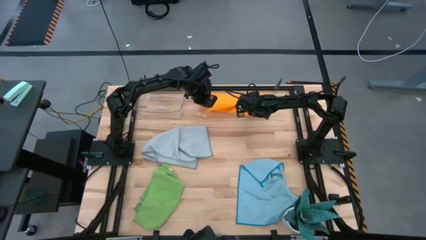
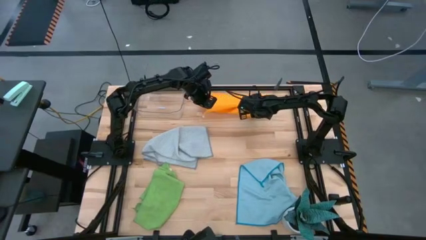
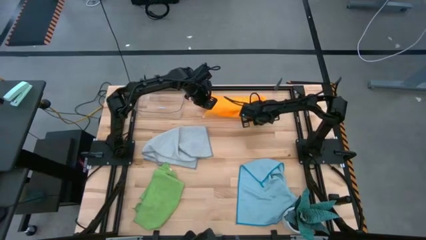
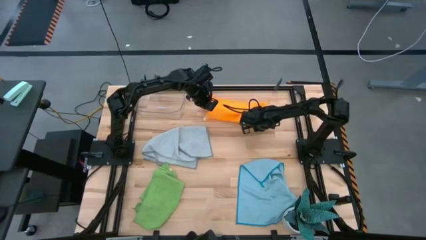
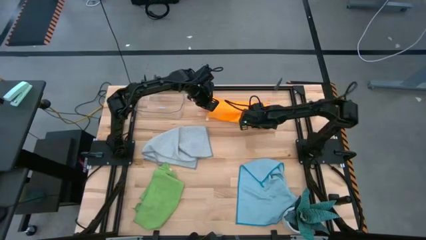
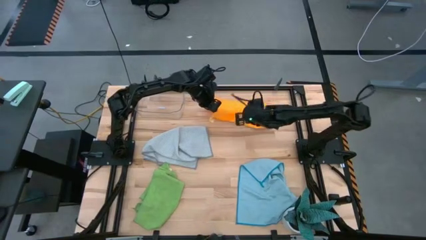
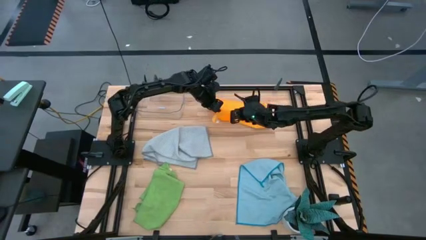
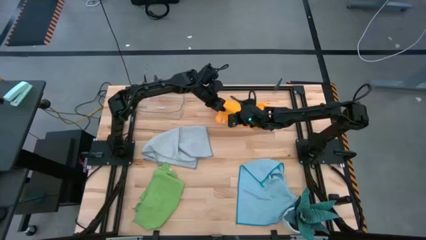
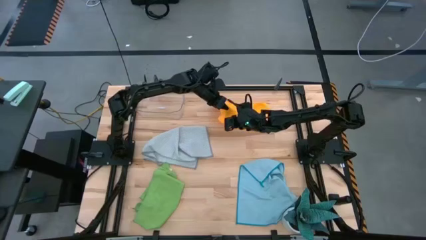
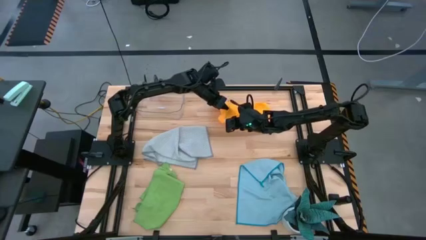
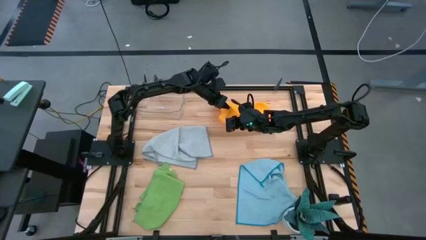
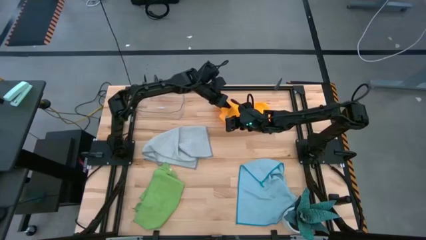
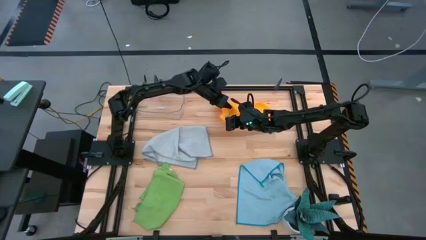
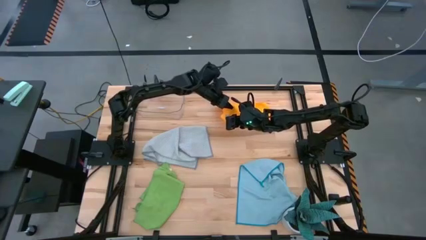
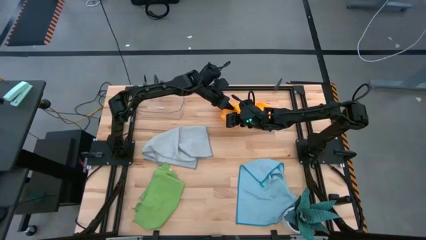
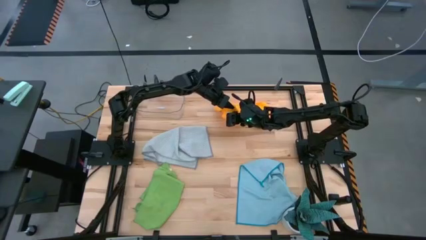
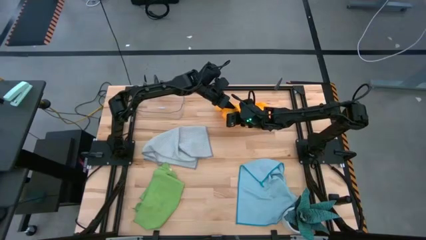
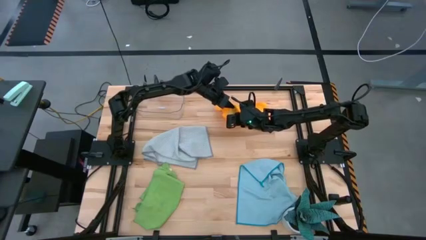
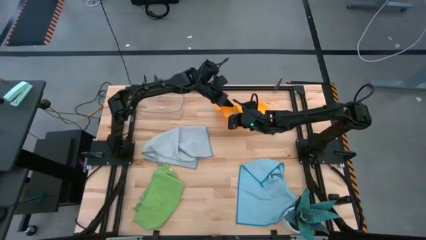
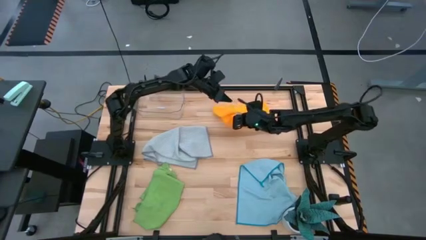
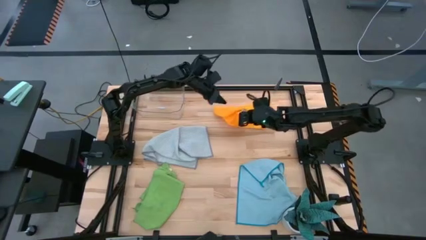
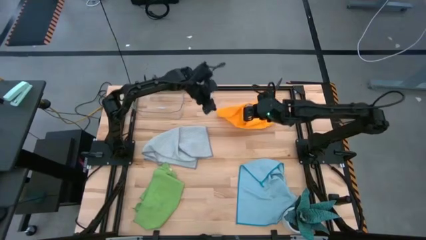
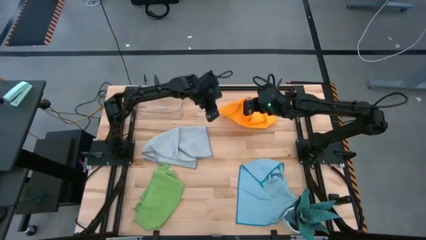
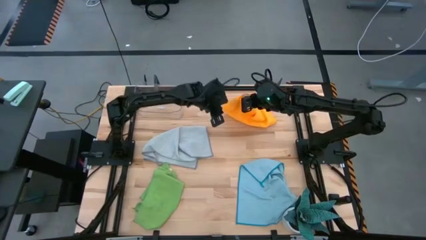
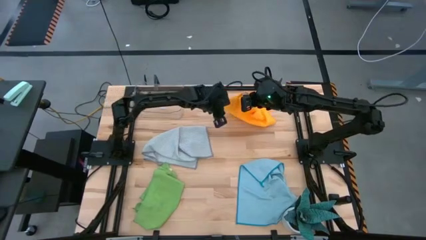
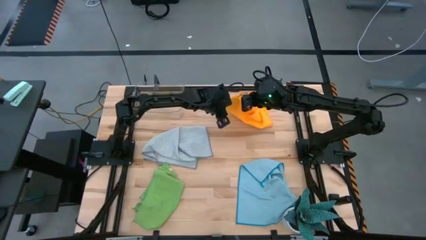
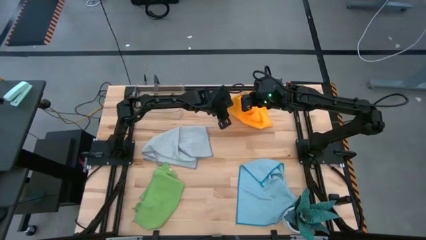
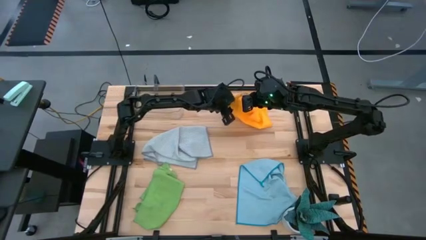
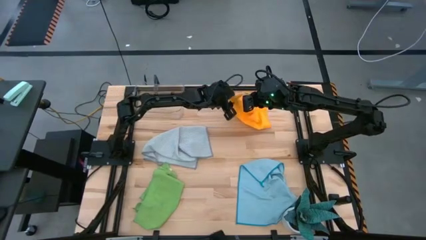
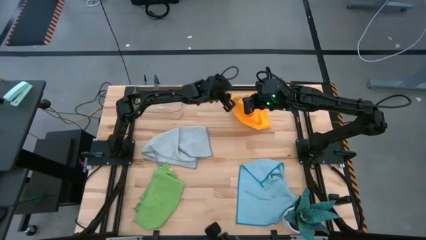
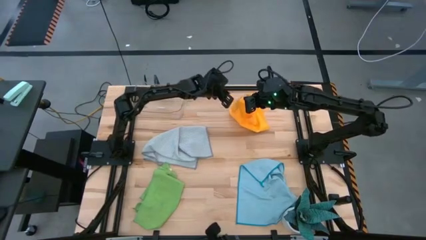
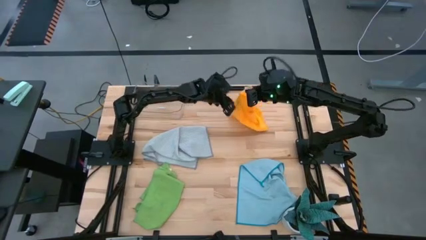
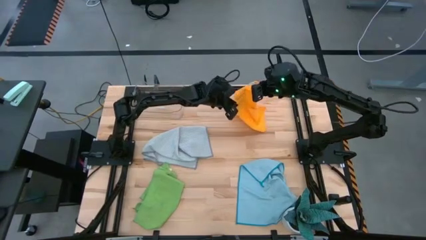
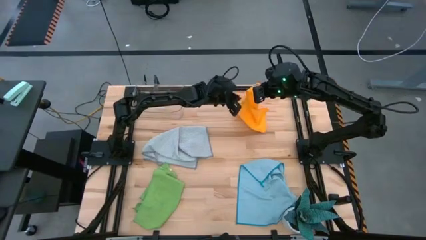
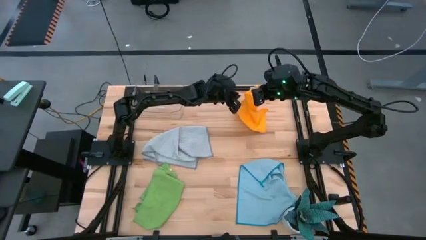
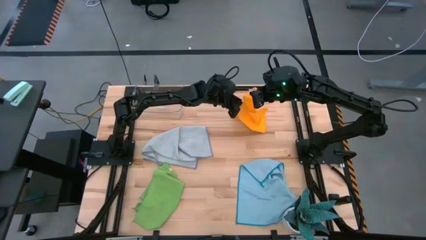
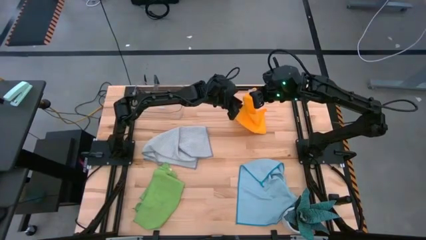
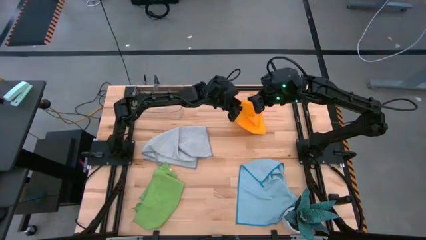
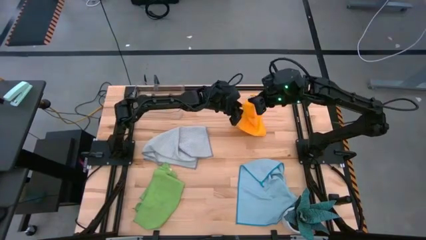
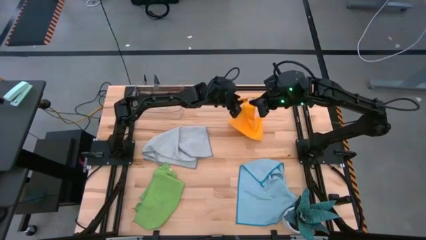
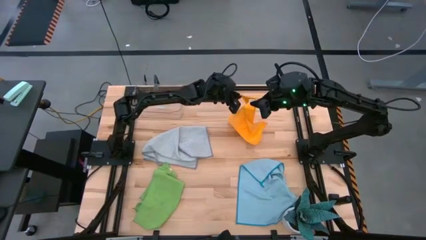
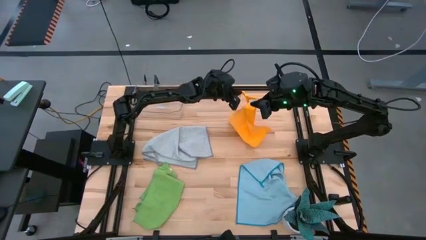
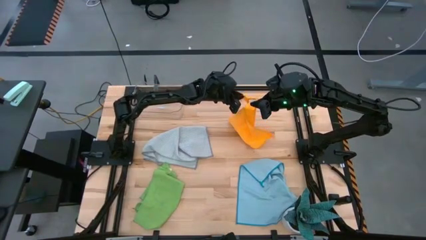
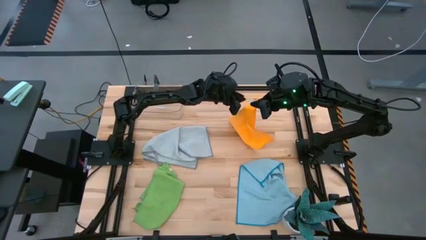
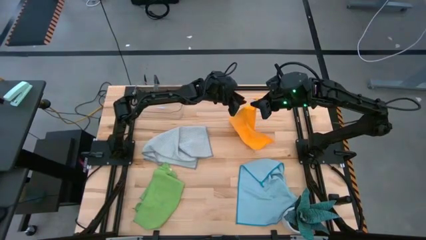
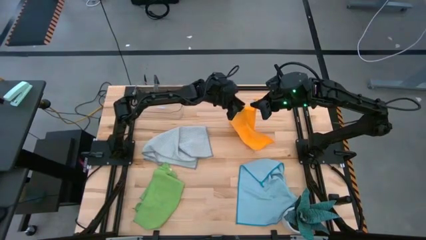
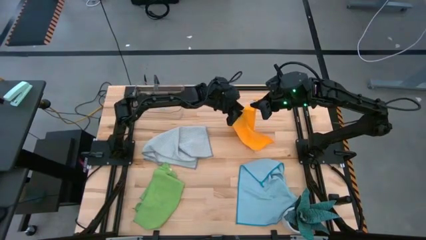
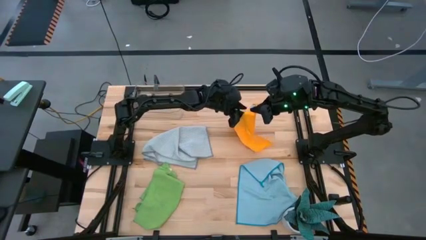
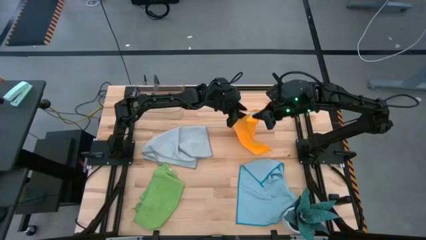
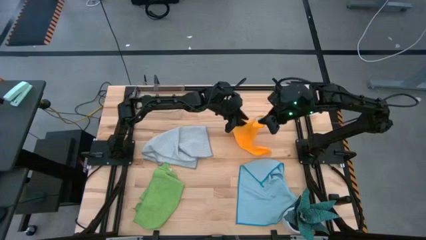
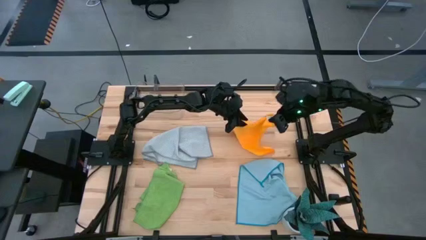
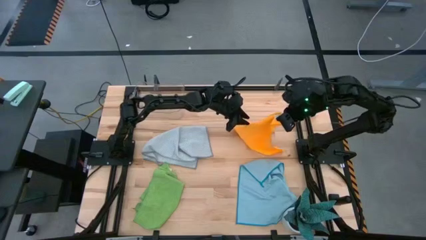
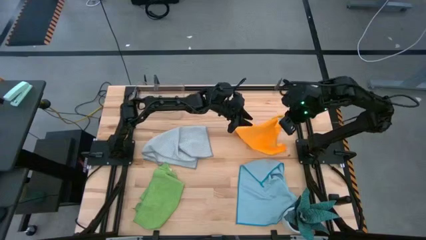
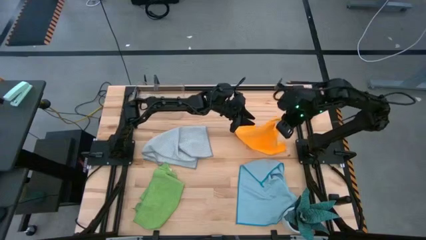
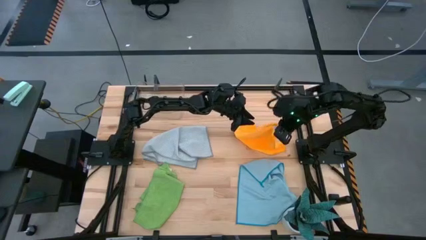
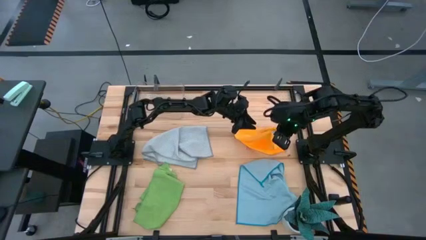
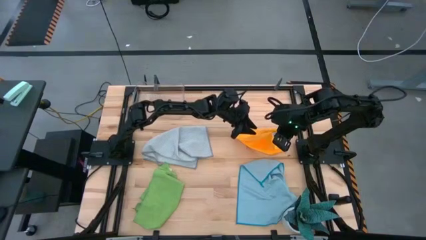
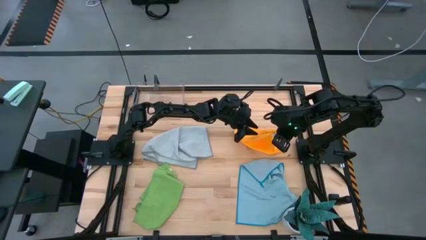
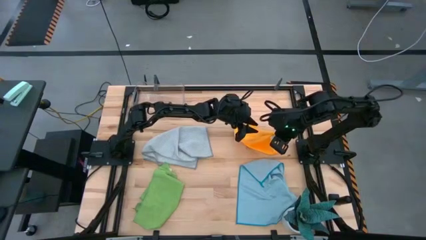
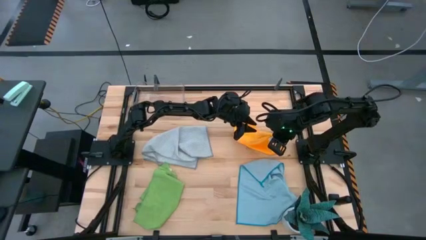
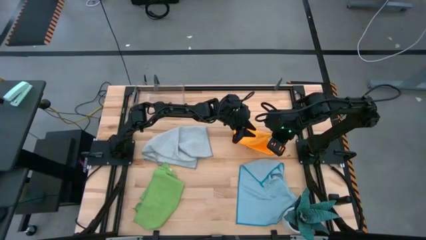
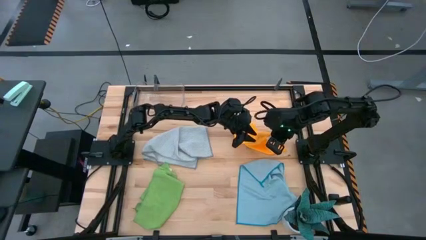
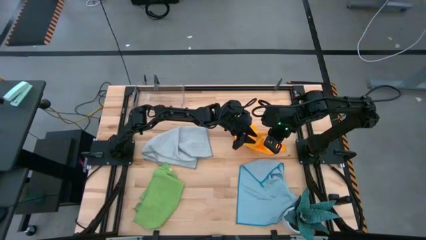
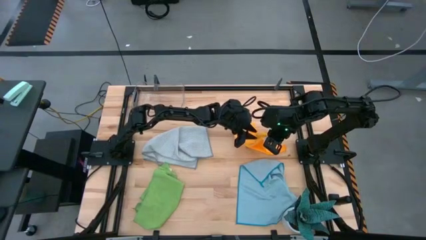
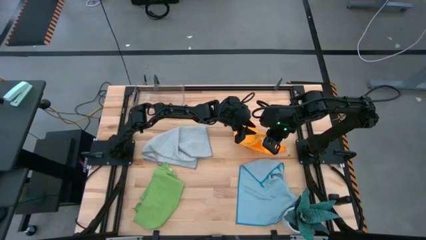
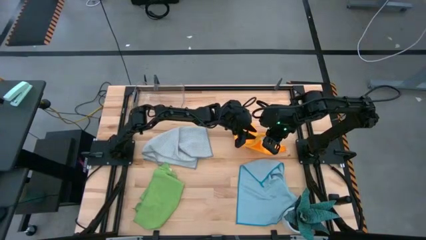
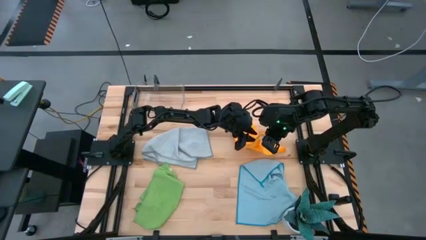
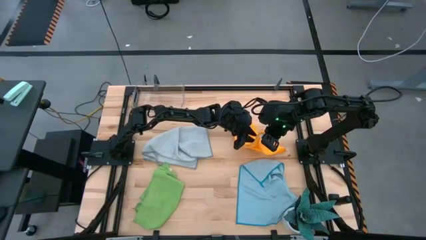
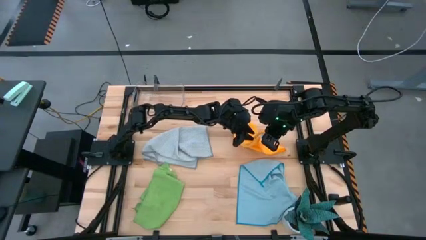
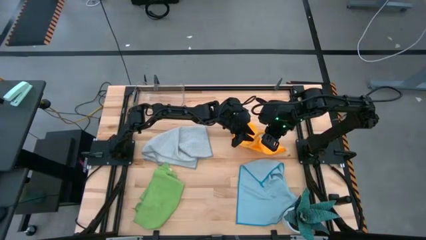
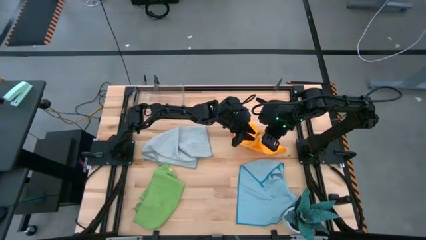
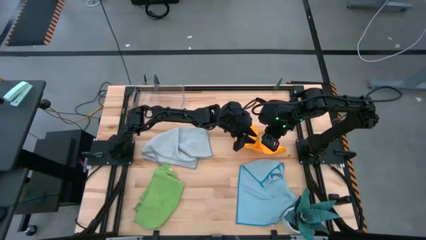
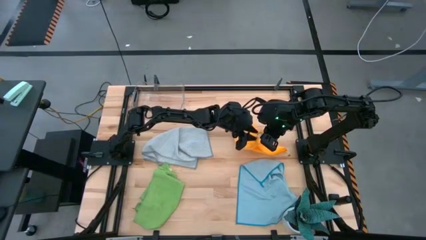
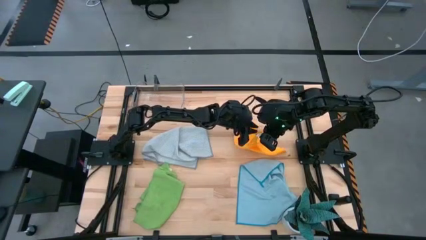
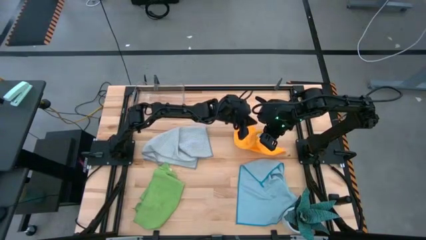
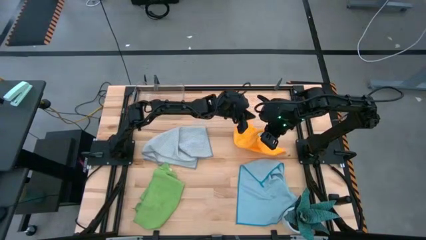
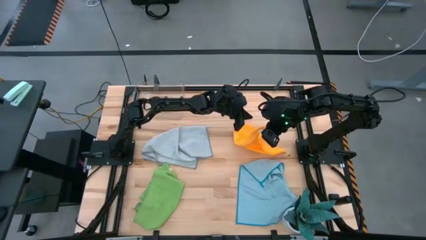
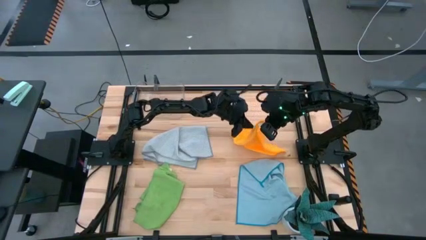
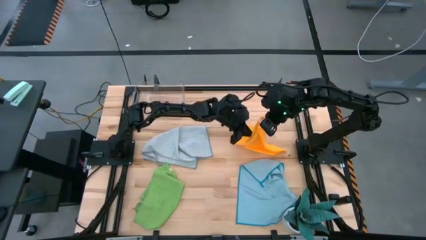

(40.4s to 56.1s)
Task: Fold microfiber towels
Fold the orange microfiber cloth
